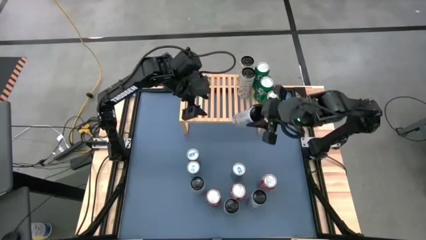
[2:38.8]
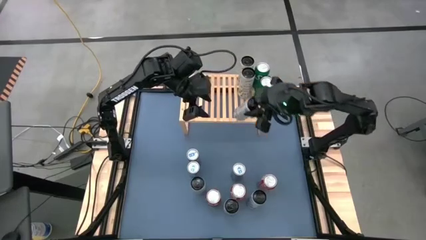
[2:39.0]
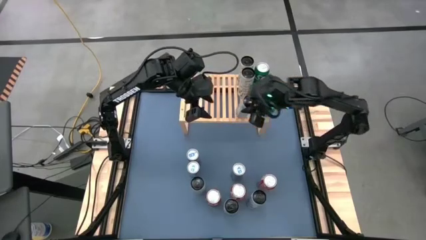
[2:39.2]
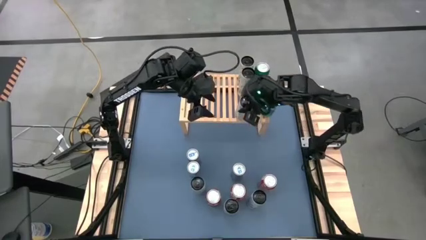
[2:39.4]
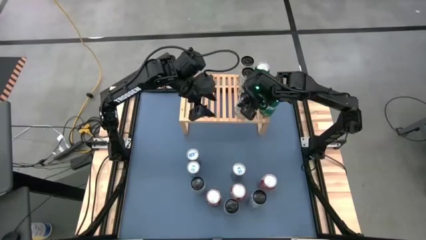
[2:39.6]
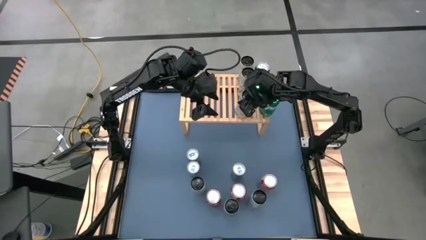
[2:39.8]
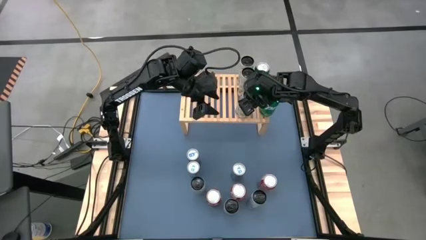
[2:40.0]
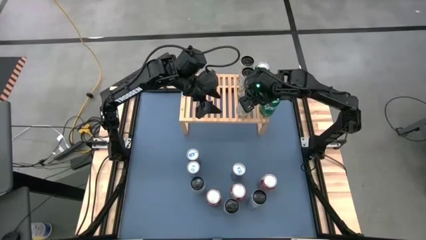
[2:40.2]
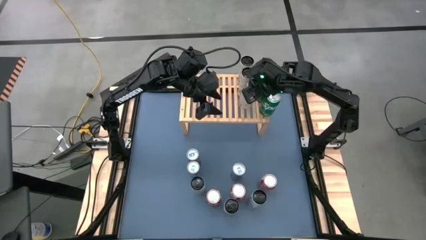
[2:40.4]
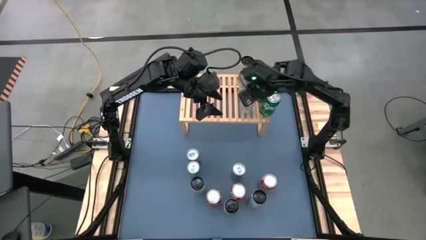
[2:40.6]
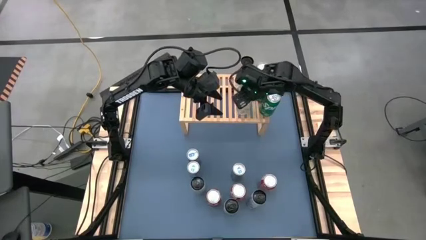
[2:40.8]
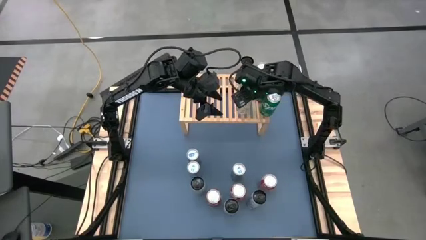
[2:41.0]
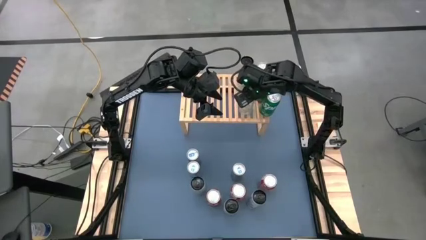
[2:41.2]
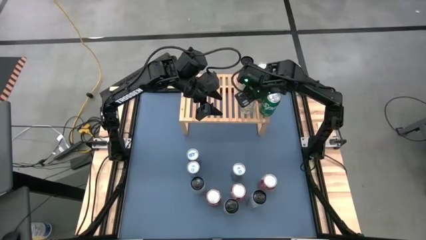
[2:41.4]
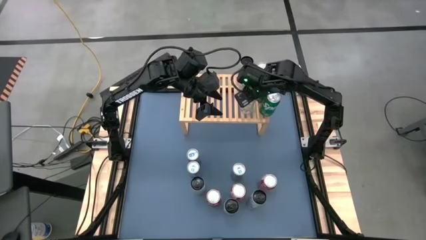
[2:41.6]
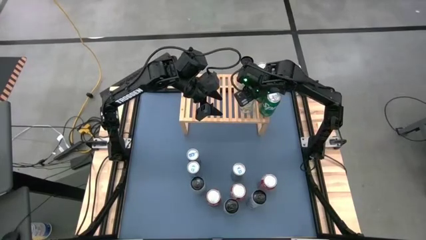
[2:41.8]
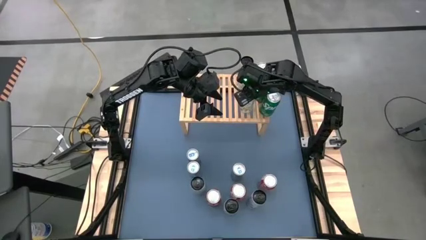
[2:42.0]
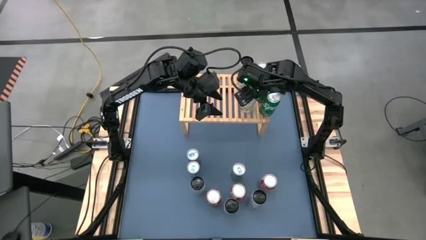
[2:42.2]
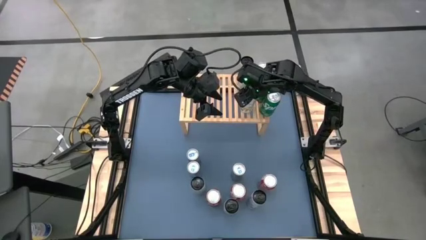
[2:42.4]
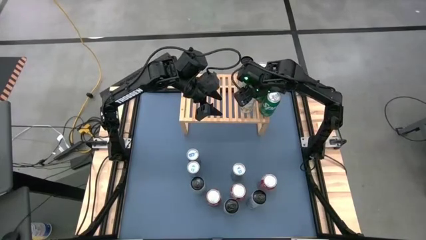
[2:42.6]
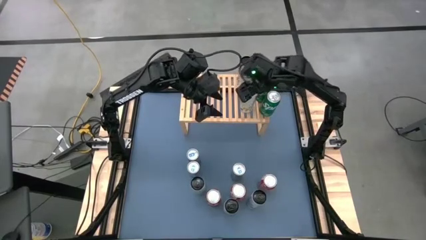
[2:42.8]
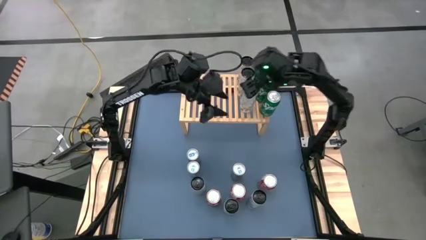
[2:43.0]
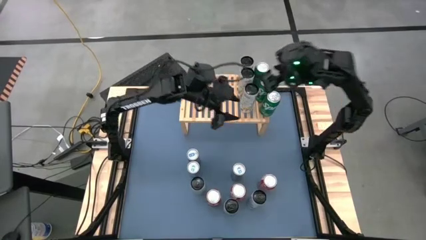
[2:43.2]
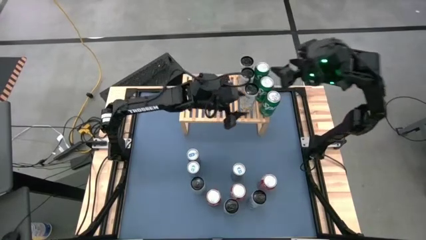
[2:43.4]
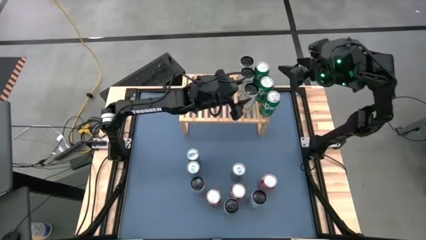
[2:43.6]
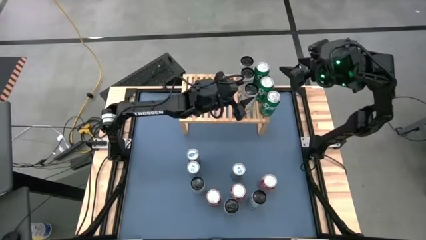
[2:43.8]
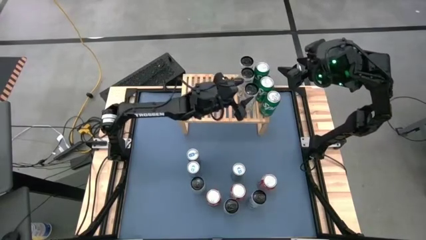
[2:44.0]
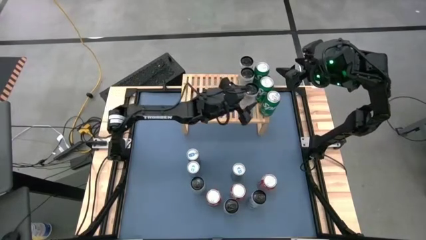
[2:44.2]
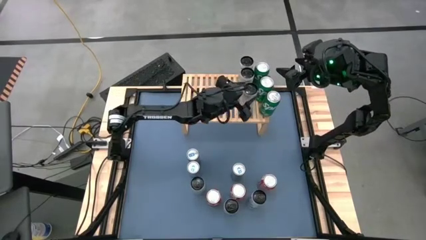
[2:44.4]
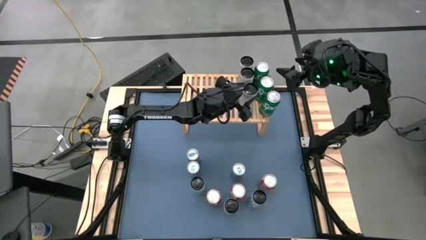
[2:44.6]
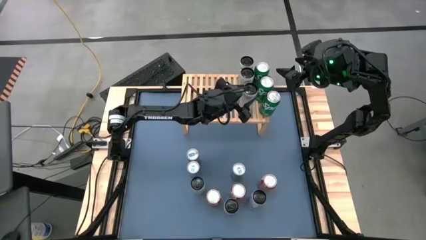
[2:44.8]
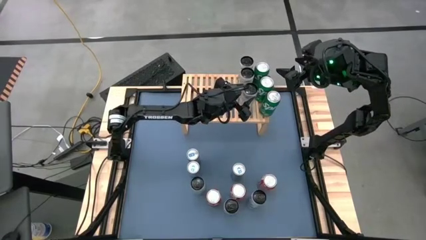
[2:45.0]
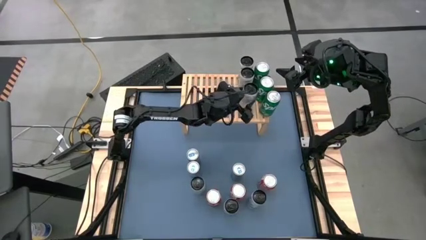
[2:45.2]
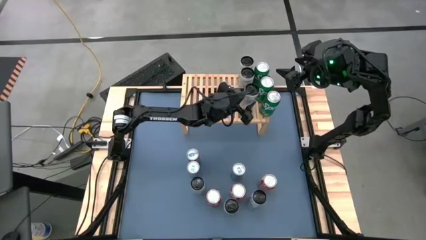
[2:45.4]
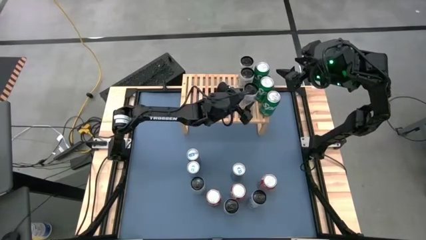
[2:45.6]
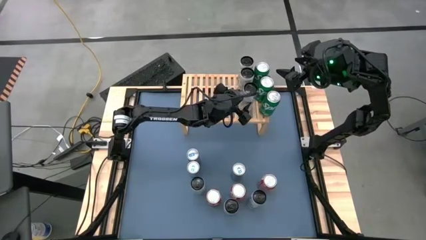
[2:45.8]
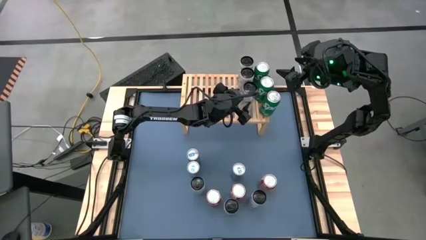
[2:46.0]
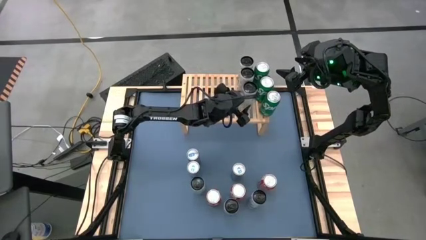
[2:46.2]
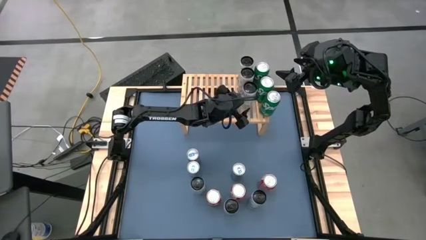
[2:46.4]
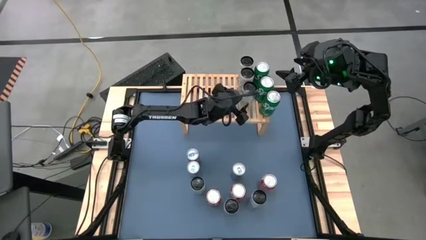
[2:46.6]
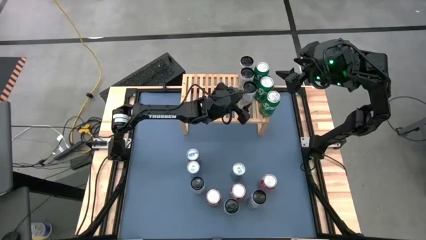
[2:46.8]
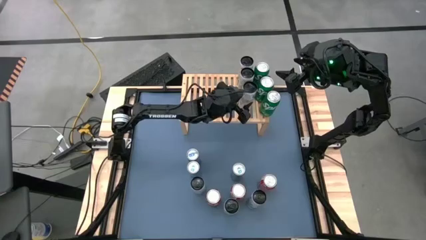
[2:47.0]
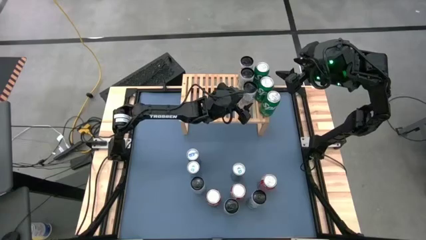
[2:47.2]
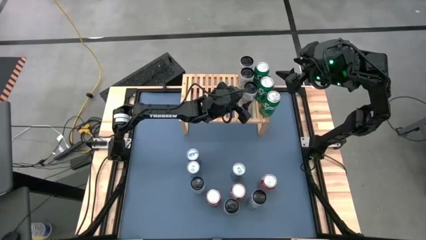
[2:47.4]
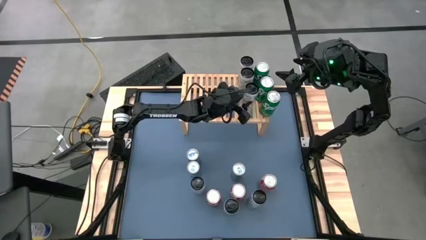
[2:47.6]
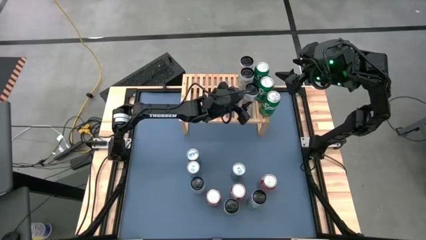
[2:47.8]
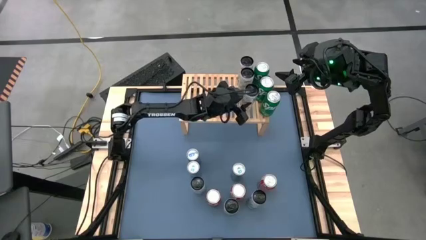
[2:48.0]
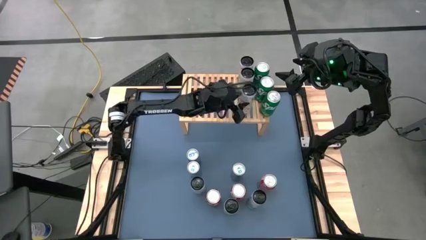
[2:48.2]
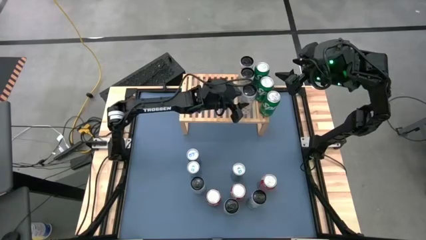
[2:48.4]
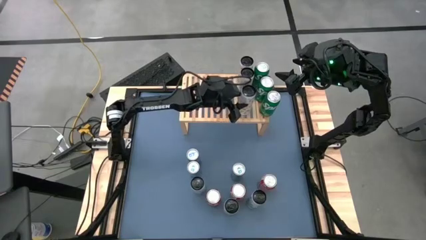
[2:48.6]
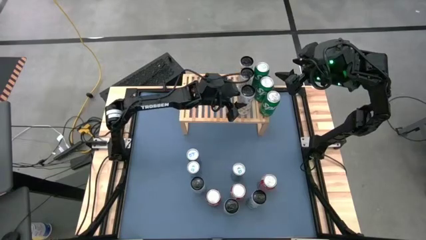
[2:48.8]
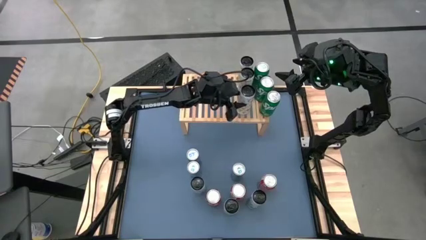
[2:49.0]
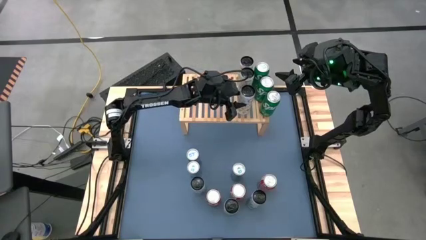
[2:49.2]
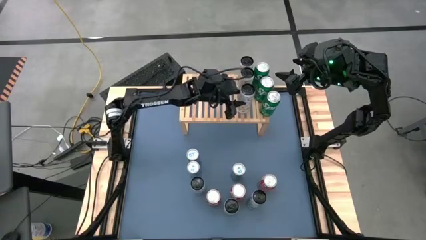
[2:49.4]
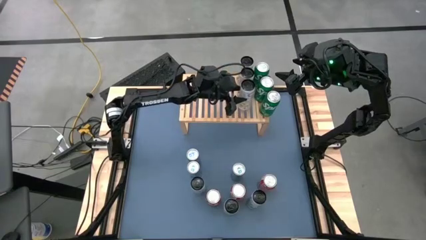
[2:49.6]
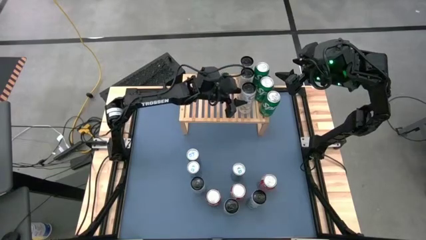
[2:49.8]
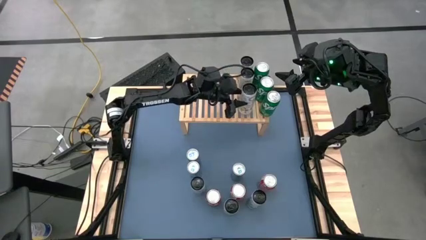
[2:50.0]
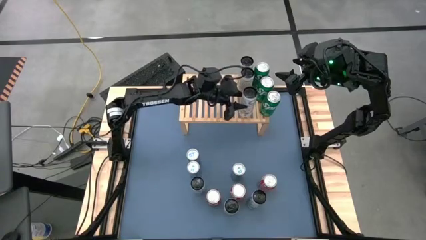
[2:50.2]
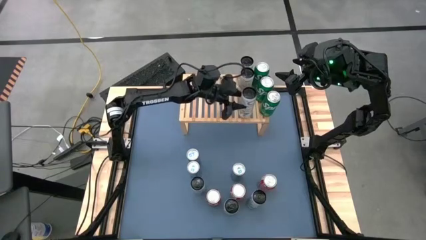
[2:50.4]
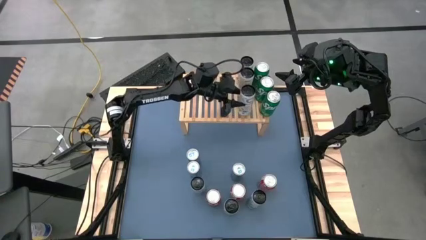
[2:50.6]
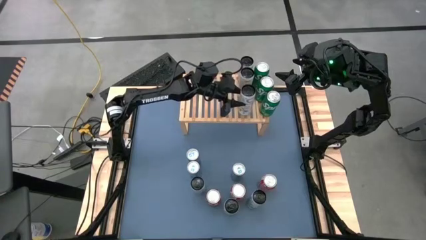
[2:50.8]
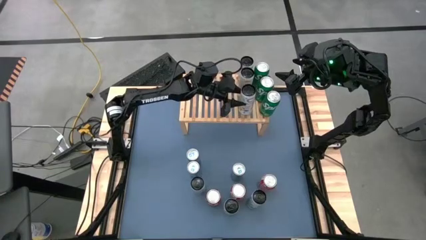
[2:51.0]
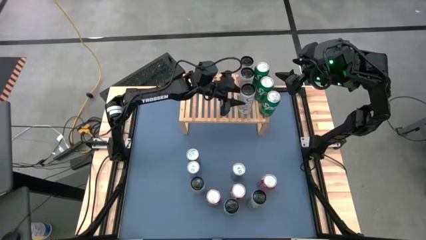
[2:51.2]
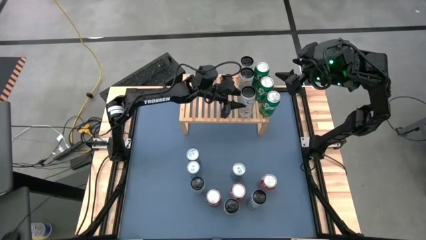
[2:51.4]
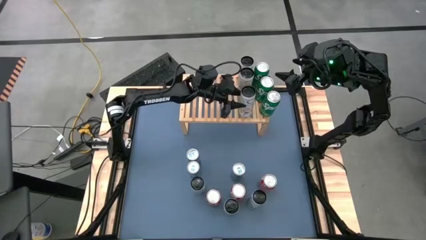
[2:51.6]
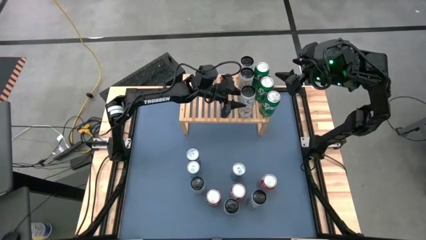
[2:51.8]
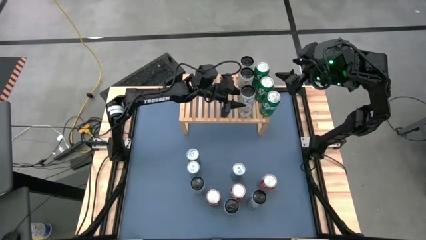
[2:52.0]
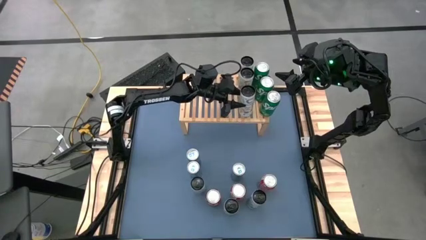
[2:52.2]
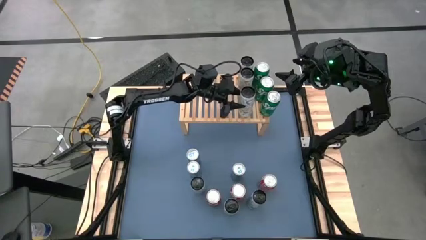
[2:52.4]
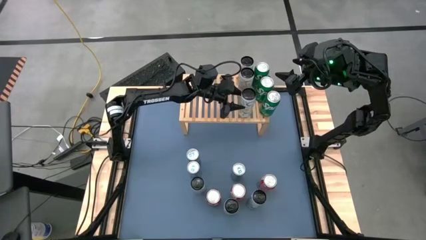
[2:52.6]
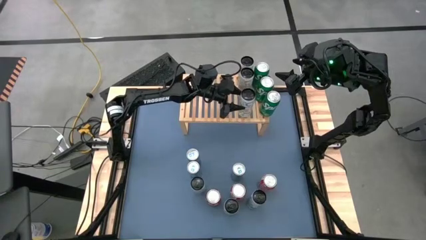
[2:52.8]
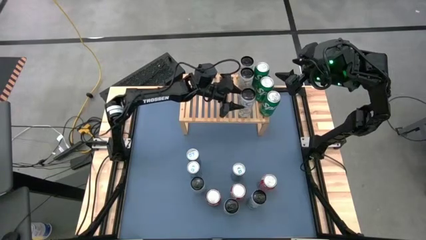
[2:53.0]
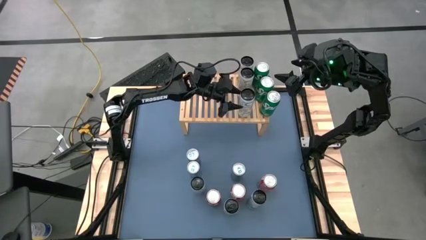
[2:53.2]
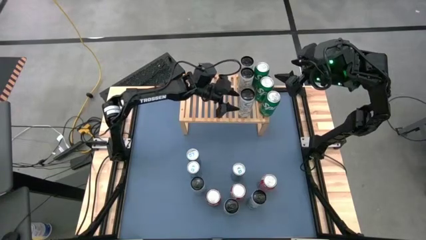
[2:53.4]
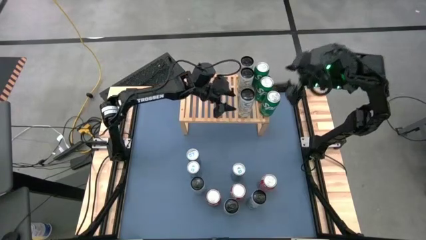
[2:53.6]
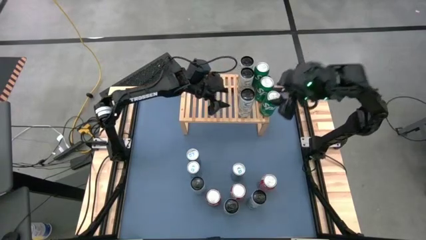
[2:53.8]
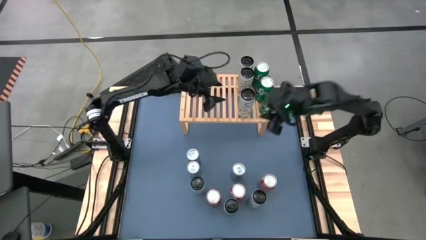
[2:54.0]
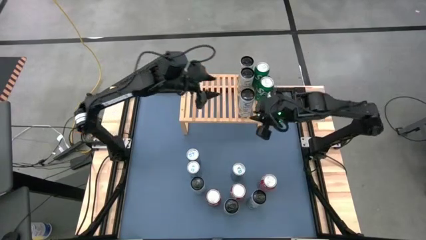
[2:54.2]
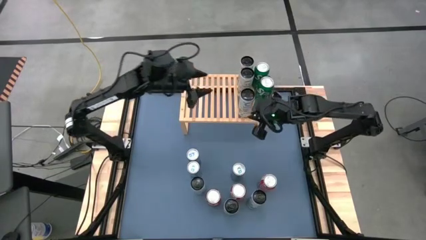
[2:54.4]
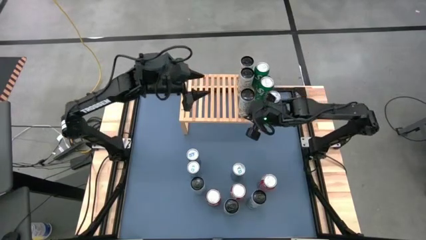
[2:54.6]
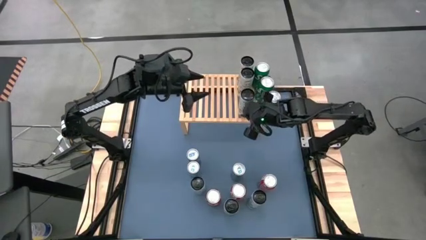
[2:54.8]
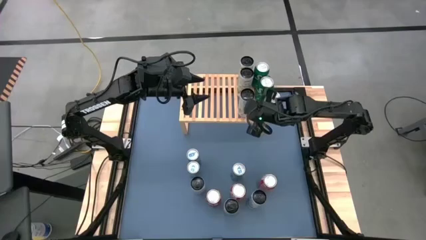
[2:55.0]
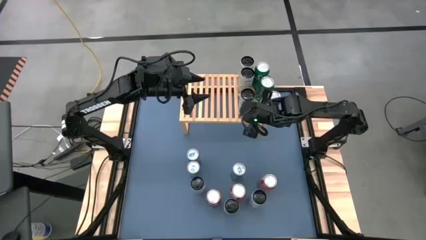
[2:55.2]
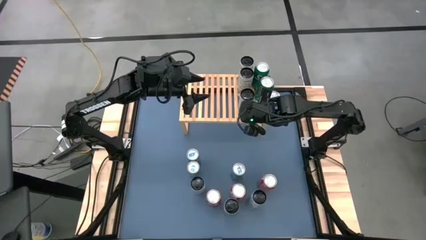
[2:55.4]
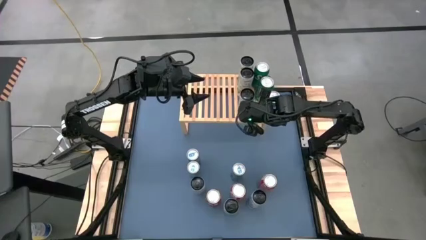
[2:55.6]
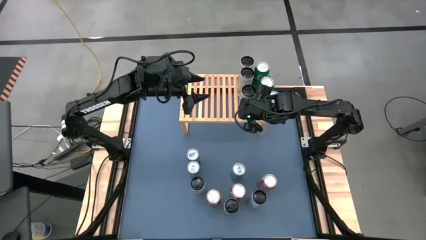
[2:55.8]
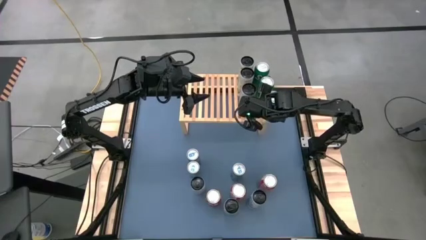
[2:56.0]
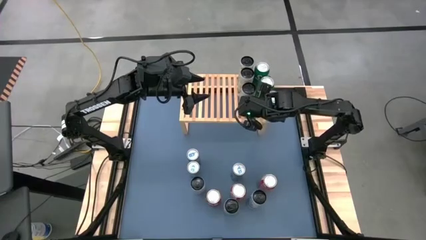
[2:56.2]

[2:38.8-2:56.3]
Task: Place canned beverage on shelf
Put the white-yellow soda can on the shelf aligned with the other white-yellow soda can
